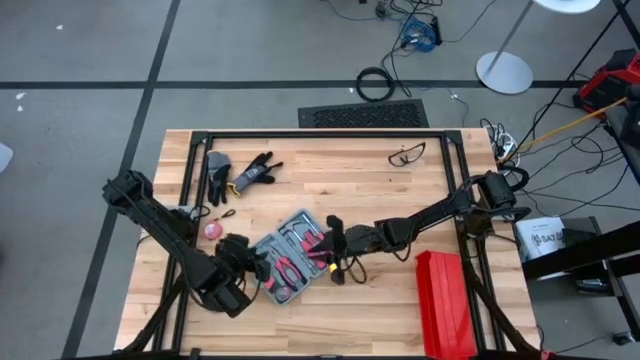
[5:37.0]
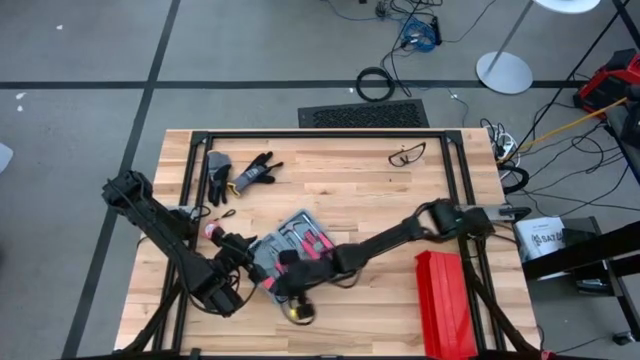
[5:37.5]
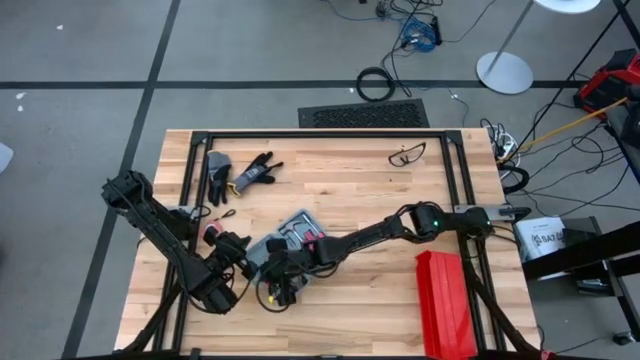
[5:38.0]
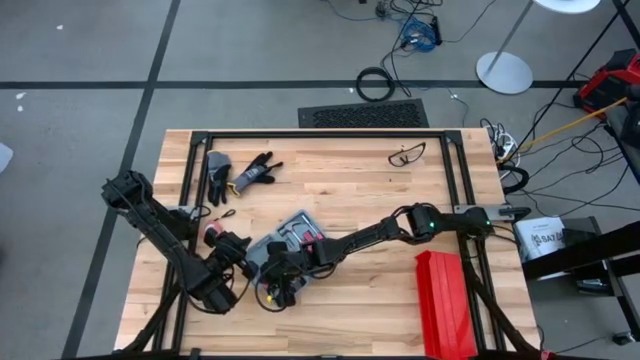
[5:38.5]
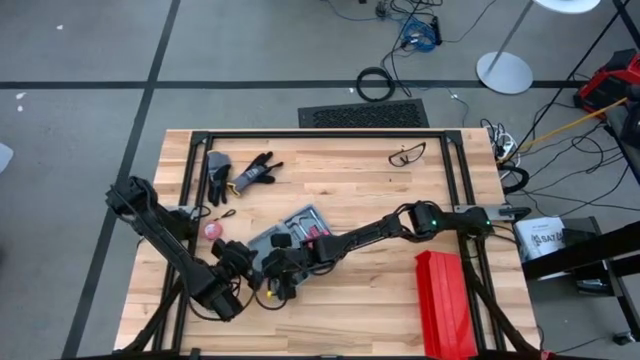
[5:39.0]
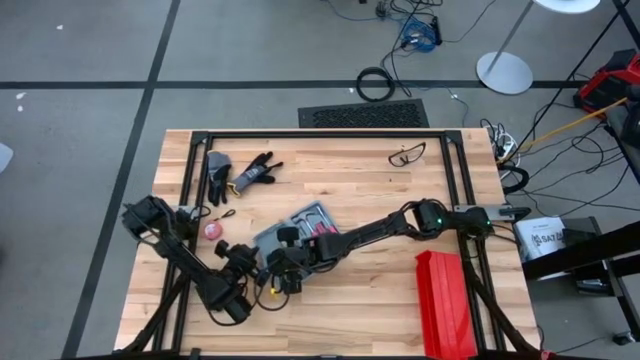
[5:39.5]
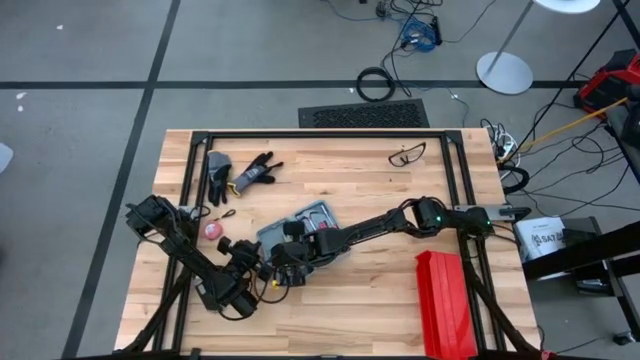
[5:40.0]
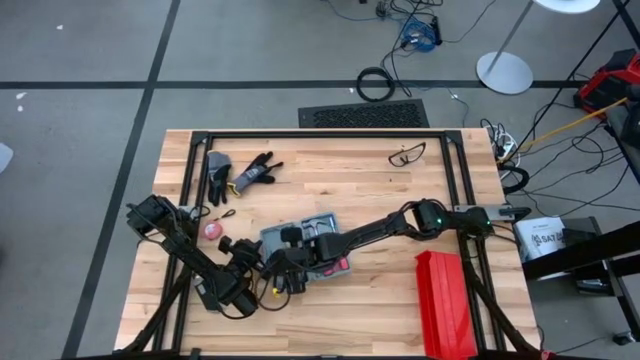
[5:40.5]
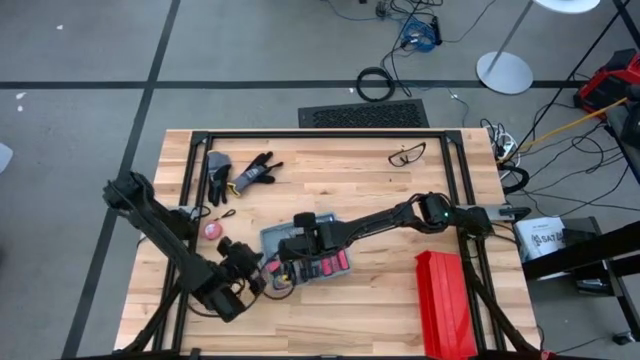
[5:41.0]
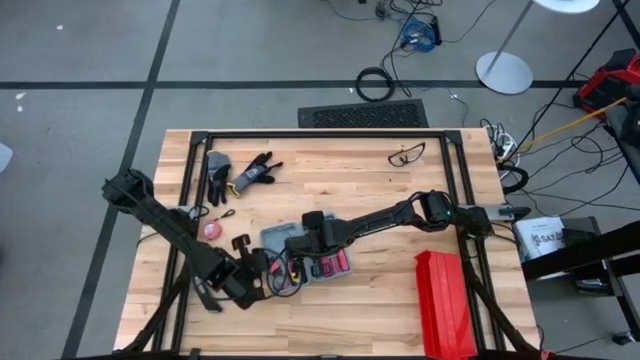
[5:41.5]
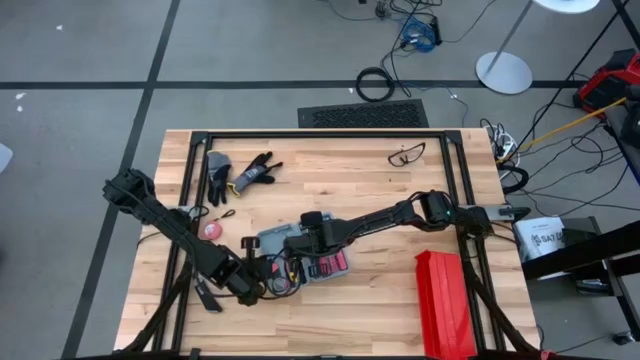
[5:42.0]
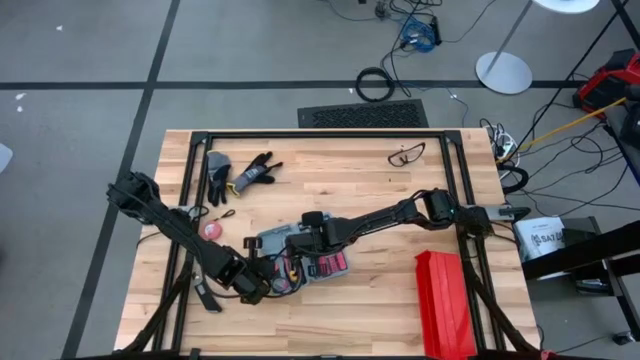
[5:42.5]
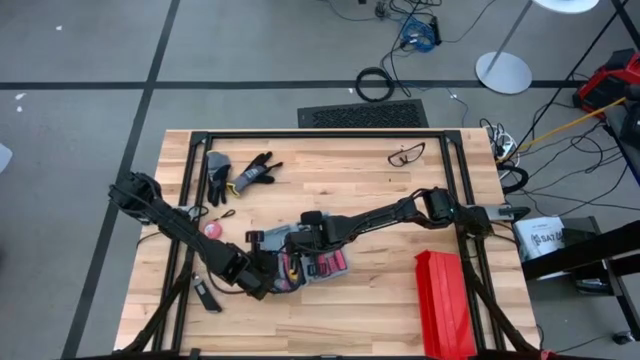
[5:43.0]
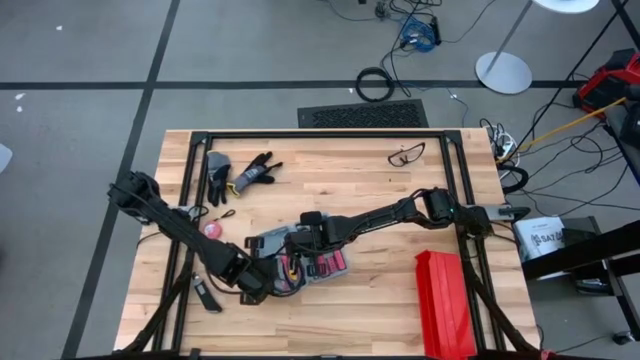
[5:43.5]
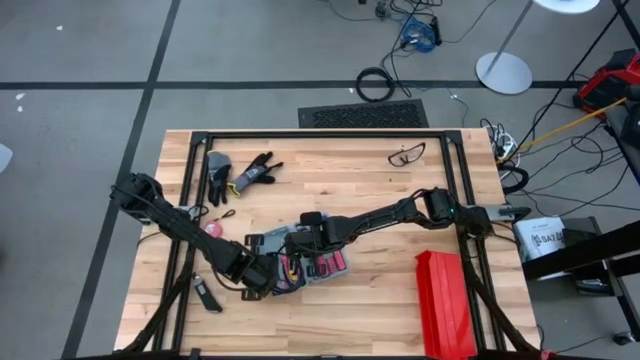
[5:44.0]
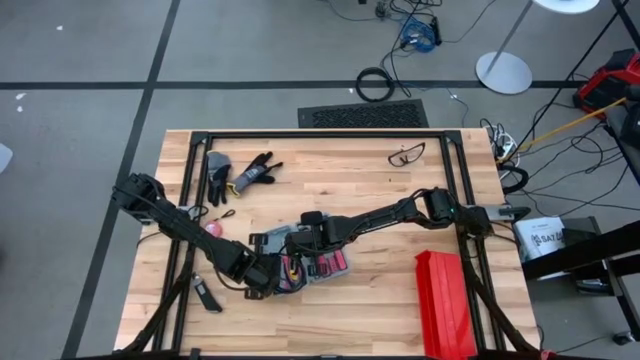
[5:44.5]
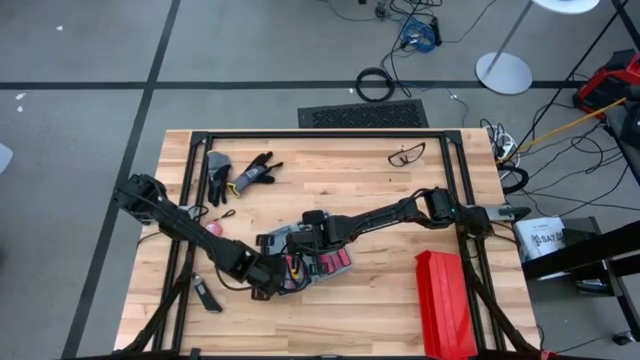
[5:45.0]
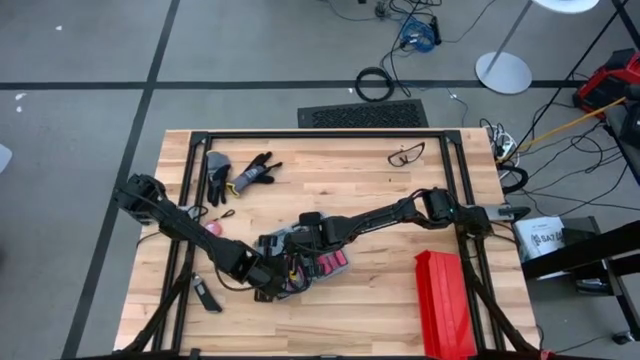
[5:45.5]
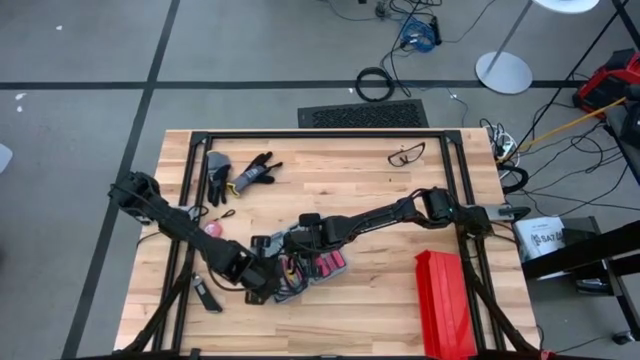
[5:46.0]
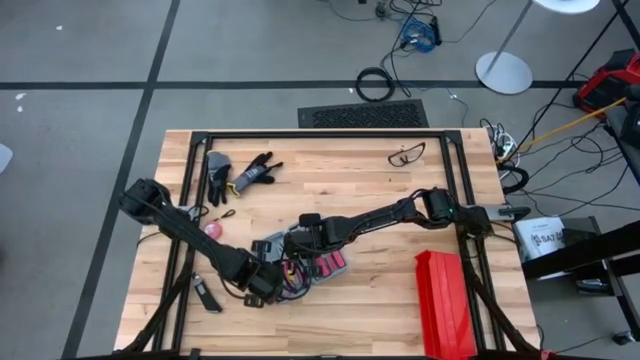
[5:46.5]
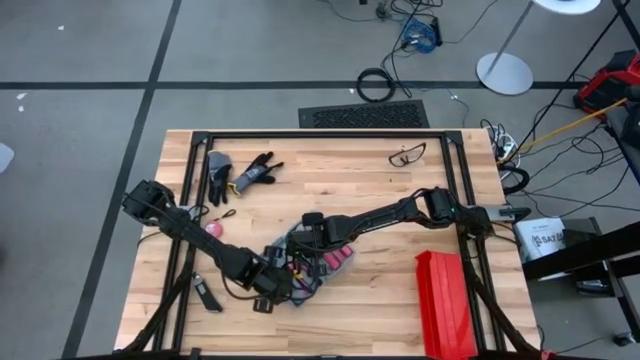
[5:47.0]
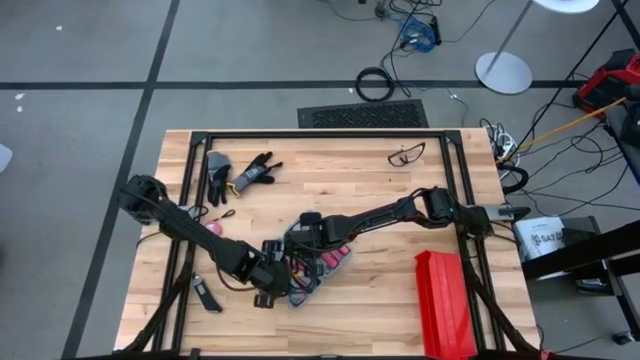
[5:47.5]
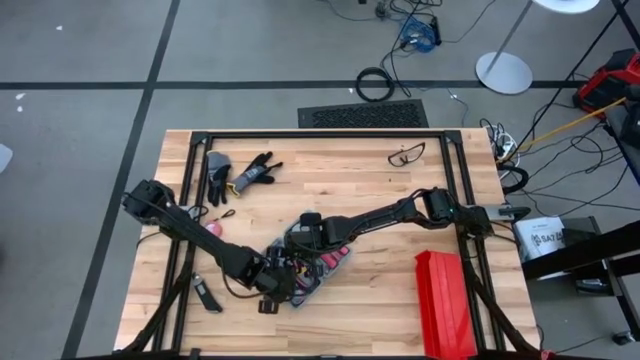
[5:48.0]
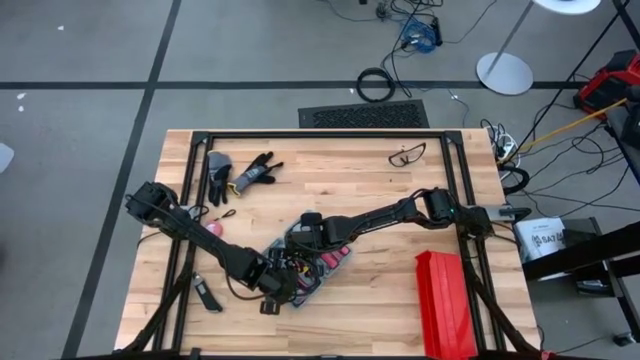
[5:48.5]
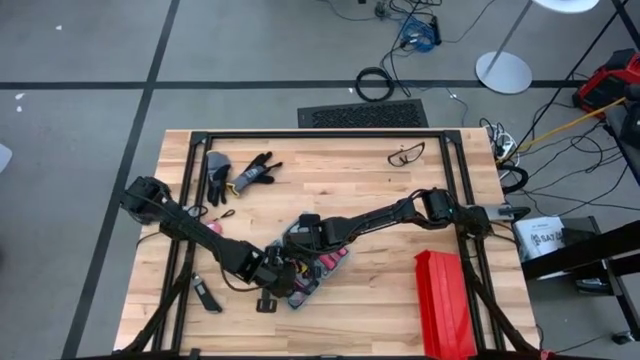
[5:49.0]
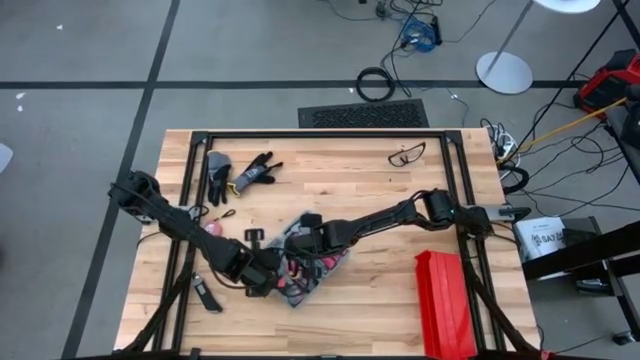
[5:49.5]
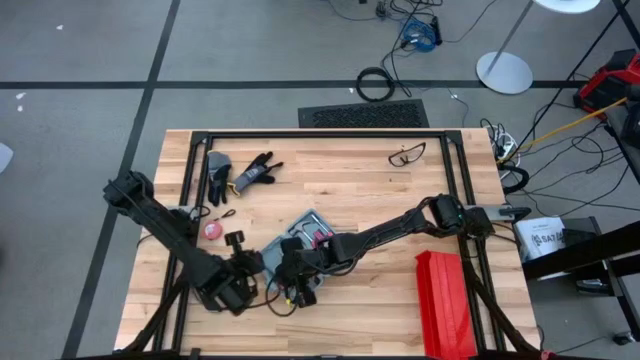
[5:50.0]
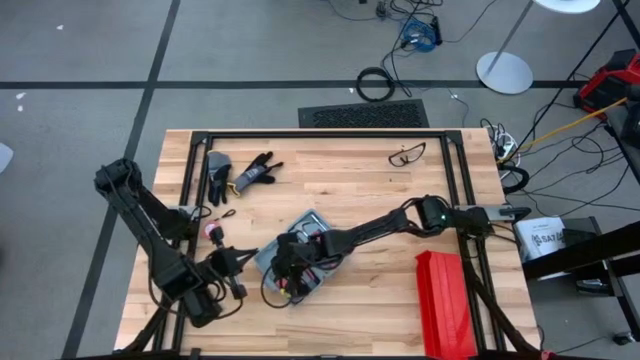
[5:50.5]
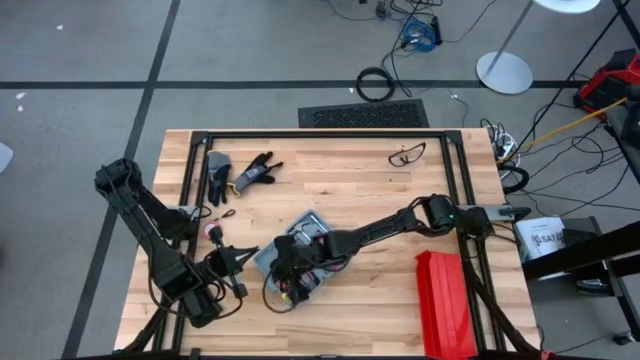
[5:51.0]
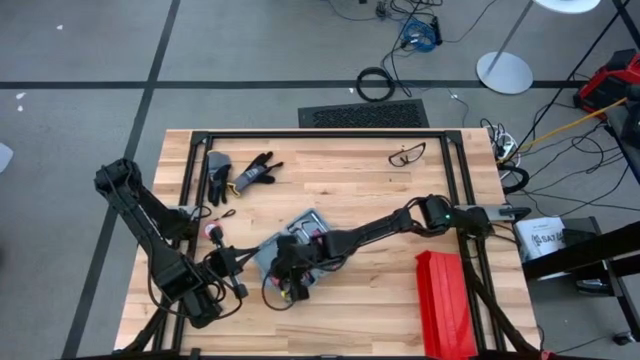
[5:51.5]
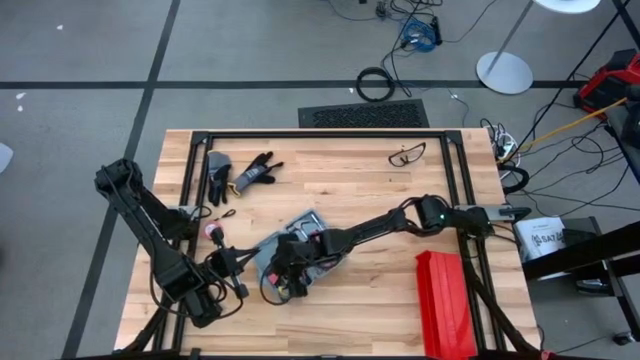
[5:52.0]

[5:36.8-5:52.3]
Task: prefit tool cases
Put the red allen wrench into the gray prefit tools case

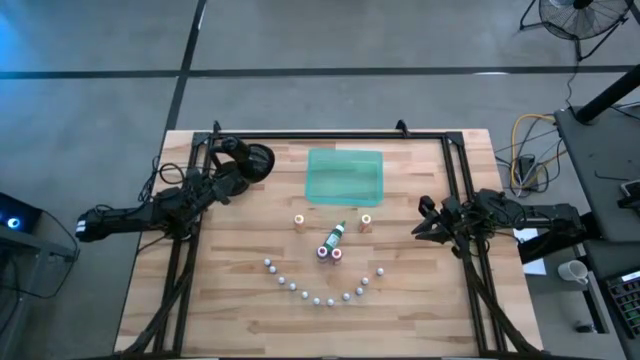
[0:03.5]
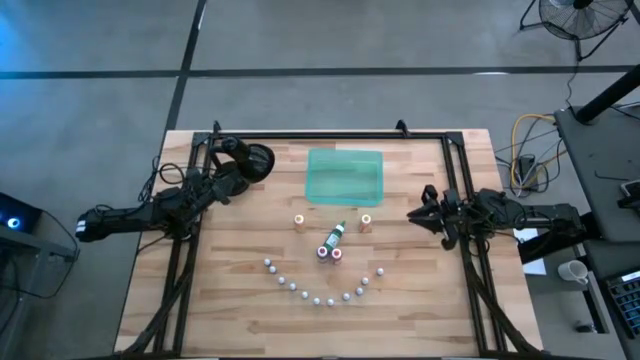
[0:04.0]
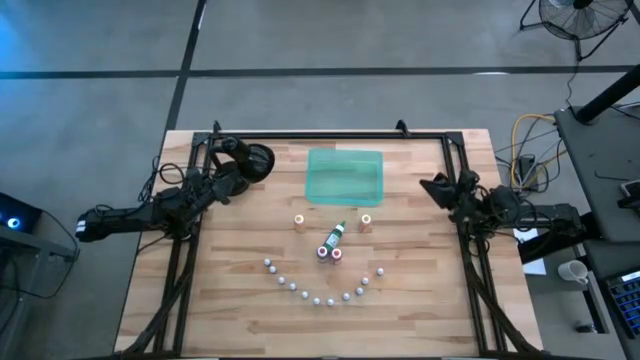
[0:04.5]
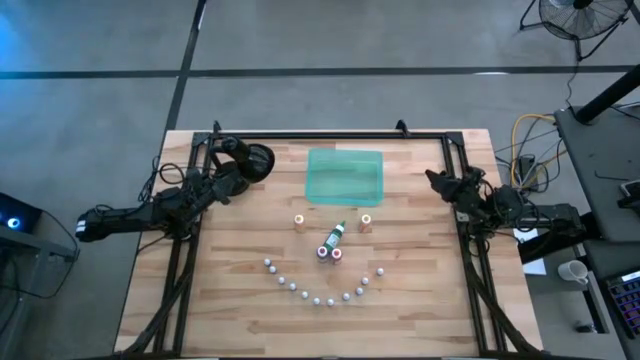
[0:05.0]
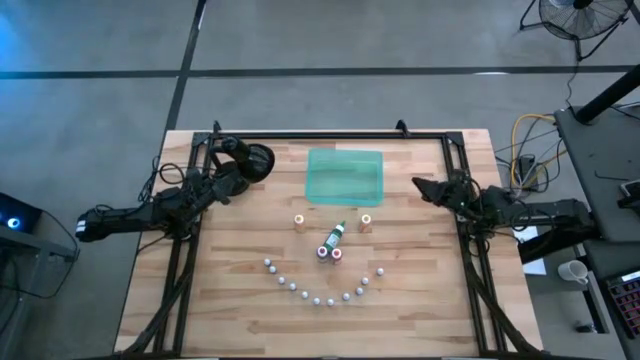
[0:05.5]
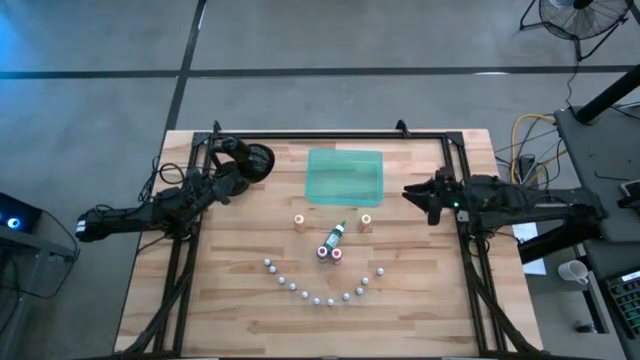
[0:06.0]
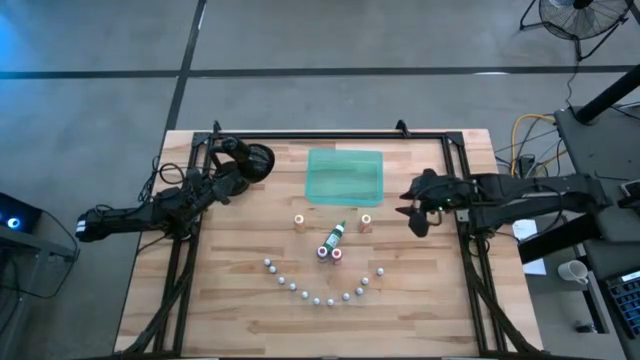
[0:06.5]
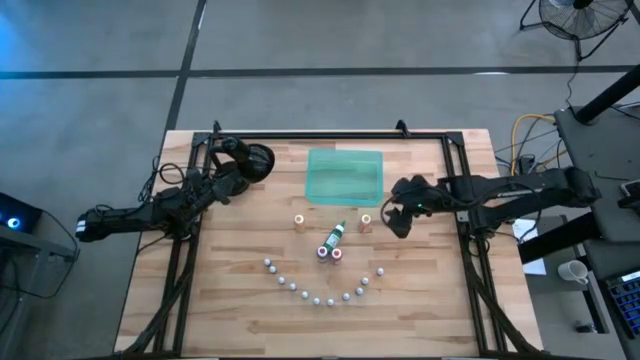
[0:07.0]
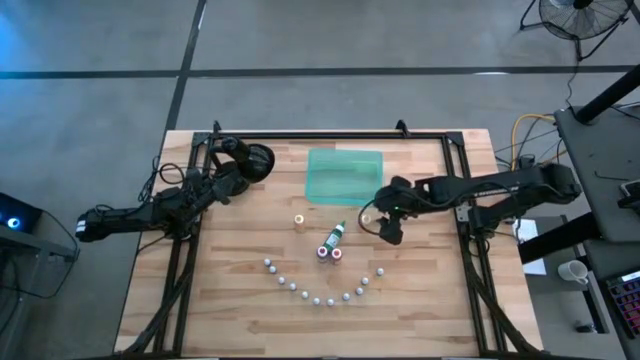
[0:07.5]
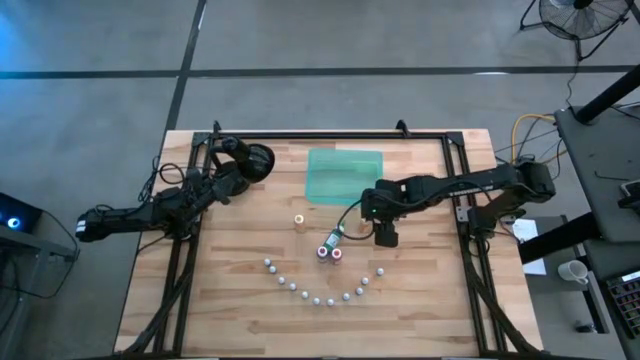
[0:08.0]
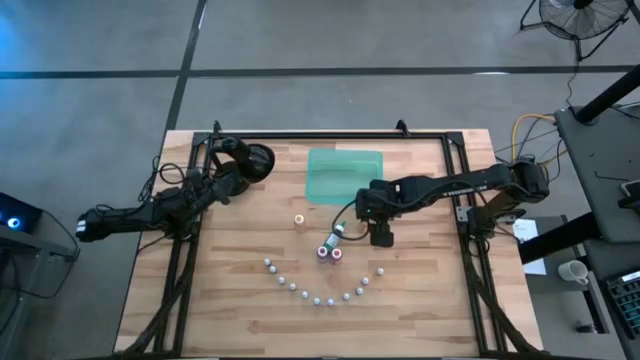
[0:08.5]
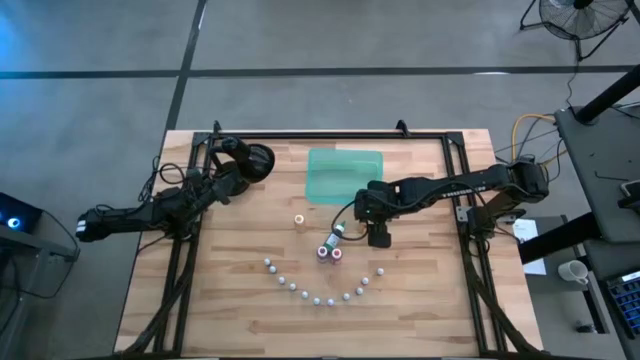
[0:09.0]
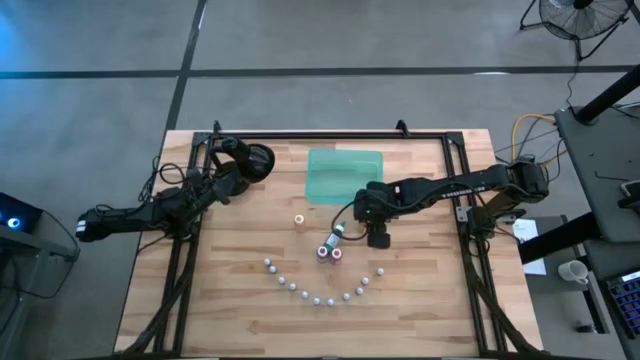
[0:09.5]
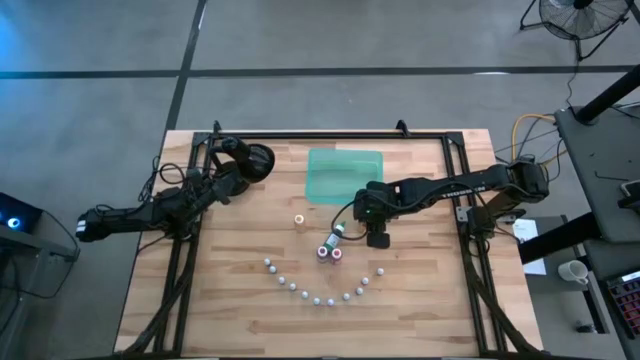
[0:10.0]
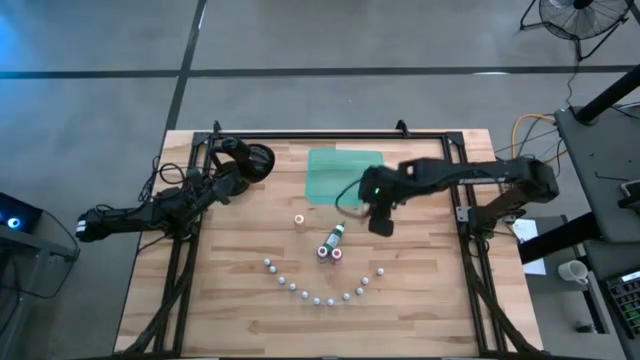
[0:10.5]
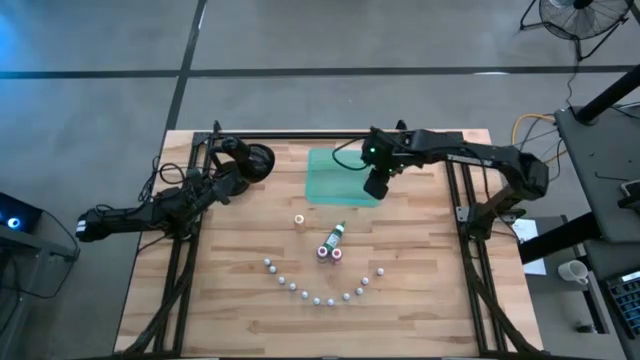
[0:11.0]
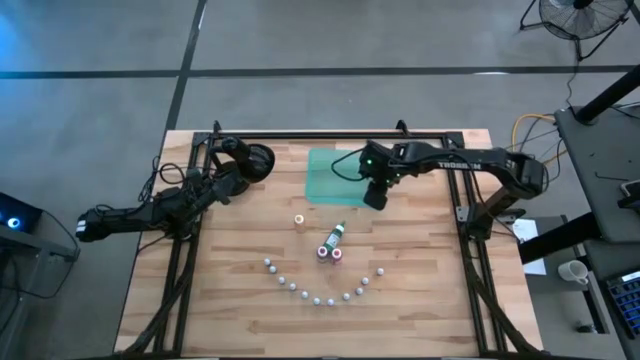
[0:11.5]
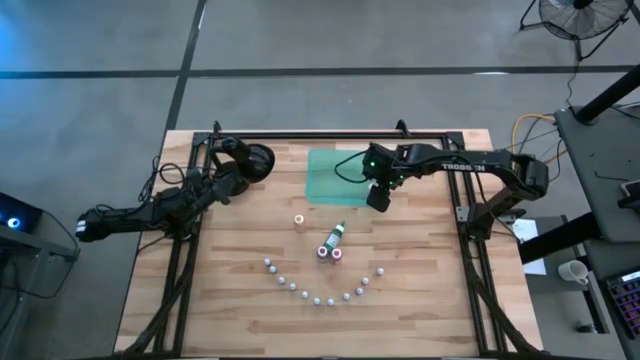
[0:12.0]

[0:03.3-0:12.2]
Task: Pick & Place food coloring
Put the right large yellow food coloring bottle into the green bin
